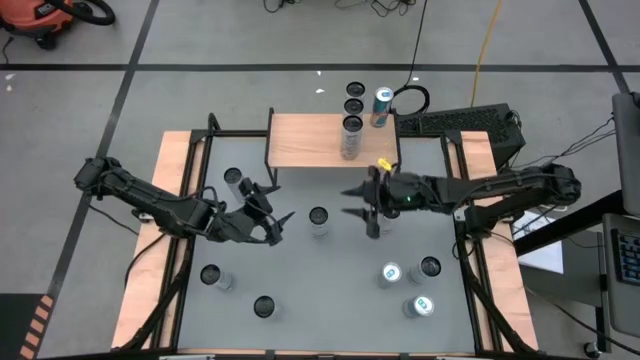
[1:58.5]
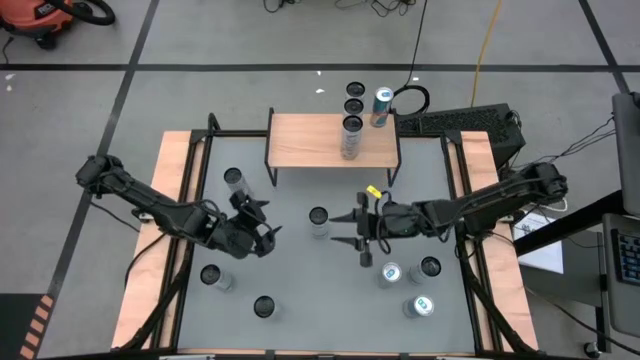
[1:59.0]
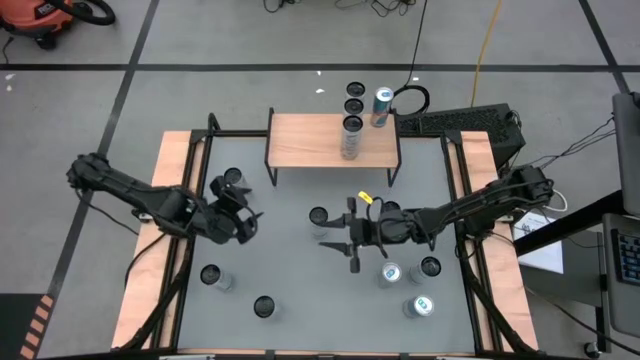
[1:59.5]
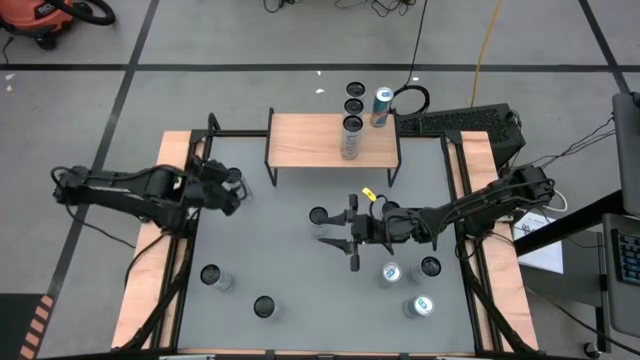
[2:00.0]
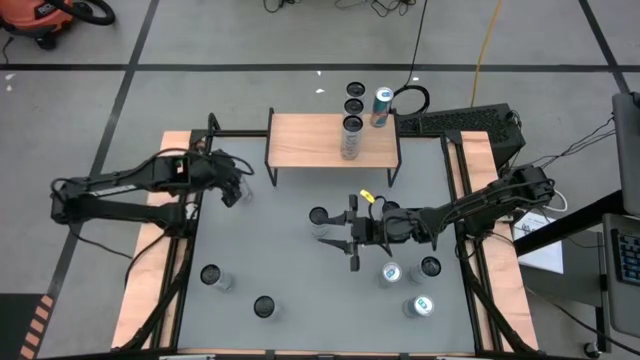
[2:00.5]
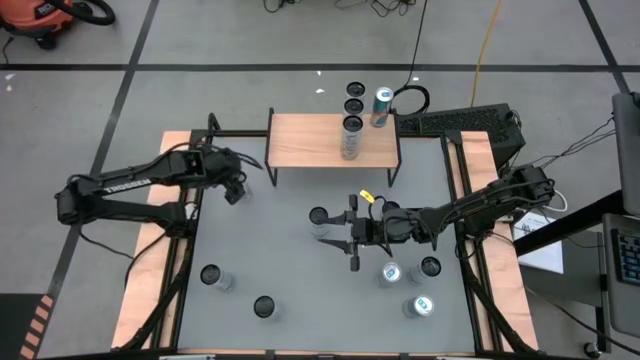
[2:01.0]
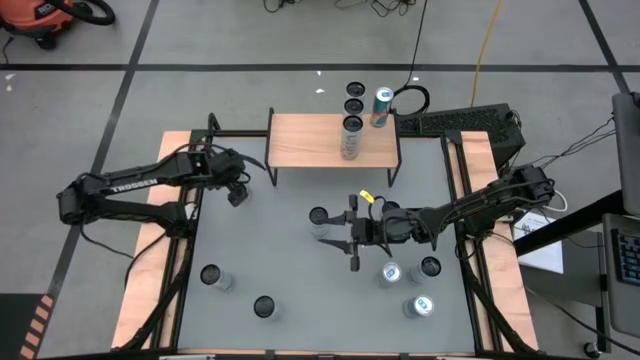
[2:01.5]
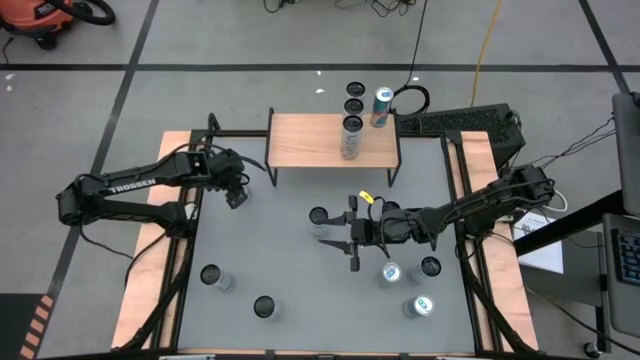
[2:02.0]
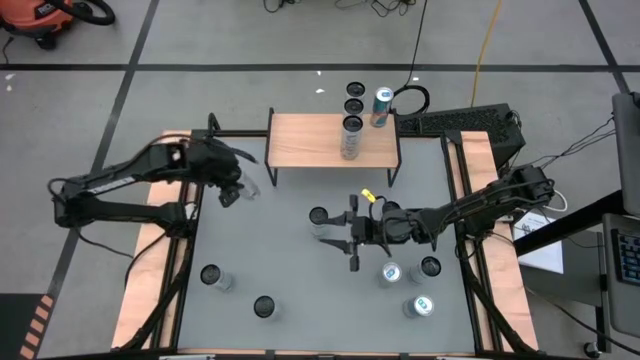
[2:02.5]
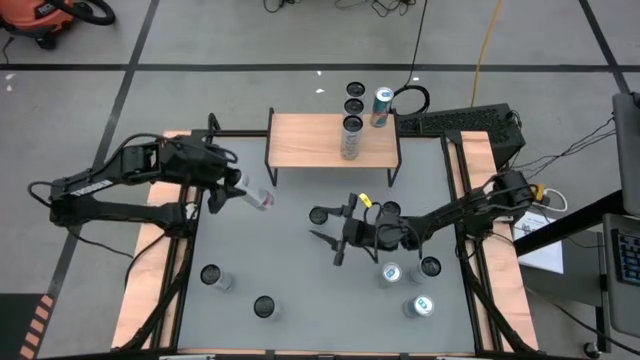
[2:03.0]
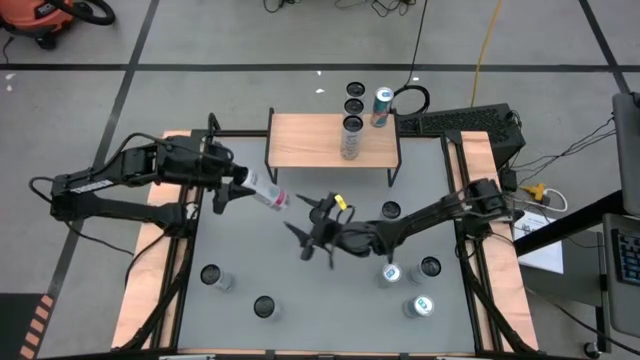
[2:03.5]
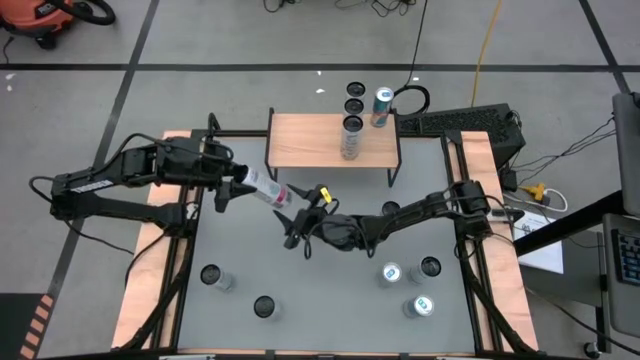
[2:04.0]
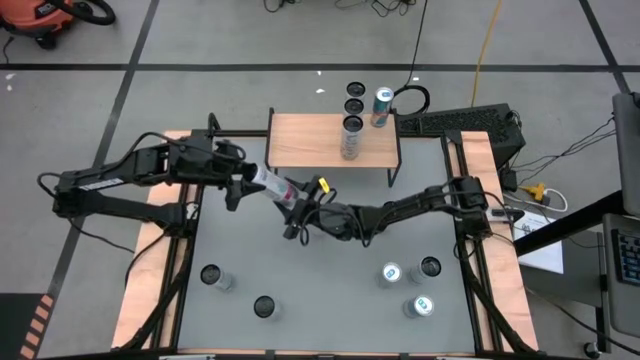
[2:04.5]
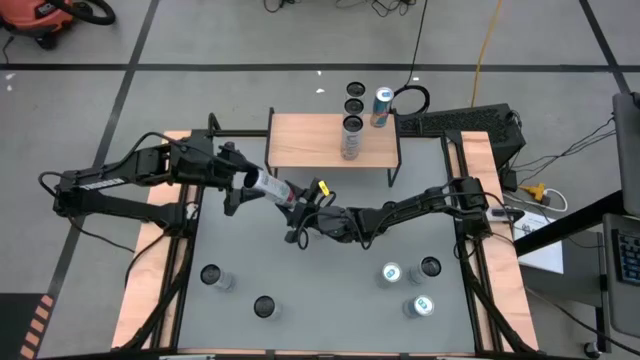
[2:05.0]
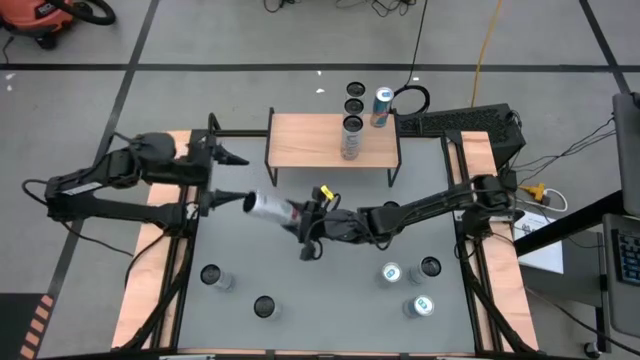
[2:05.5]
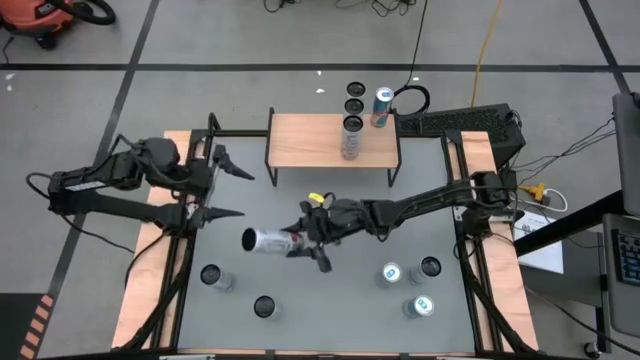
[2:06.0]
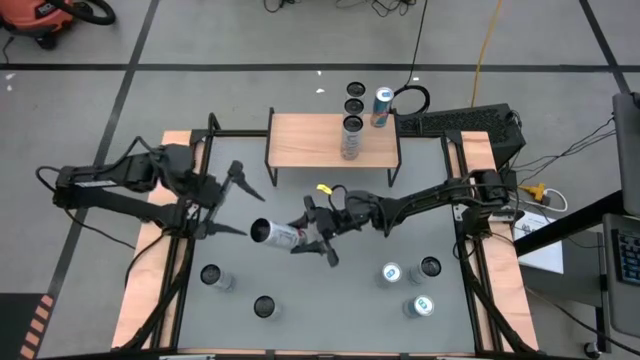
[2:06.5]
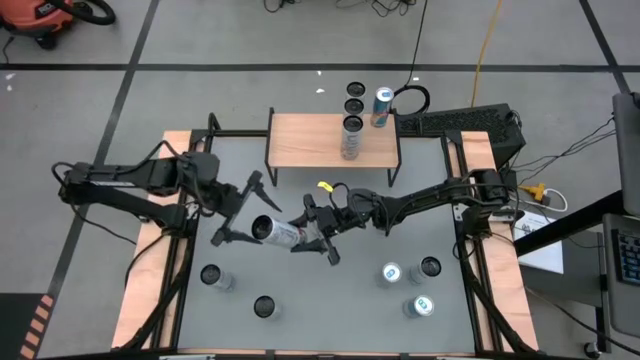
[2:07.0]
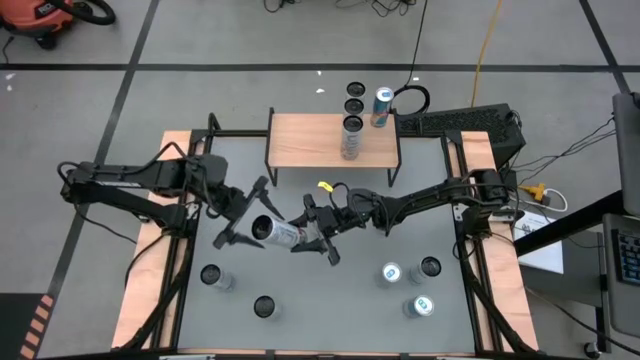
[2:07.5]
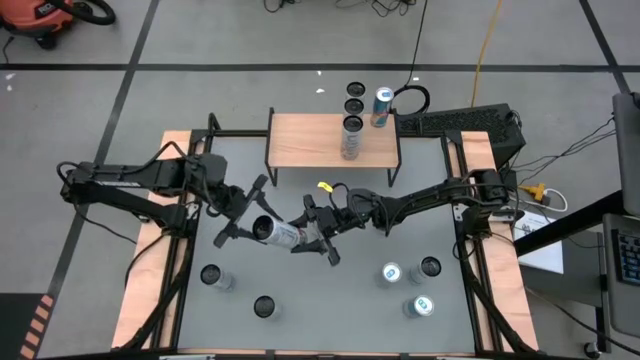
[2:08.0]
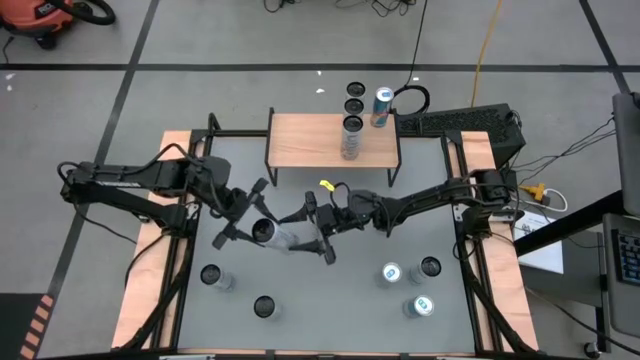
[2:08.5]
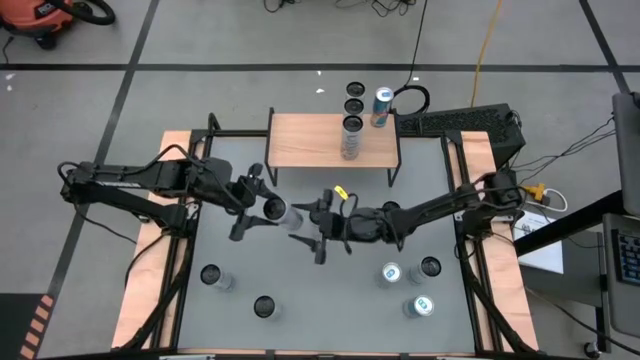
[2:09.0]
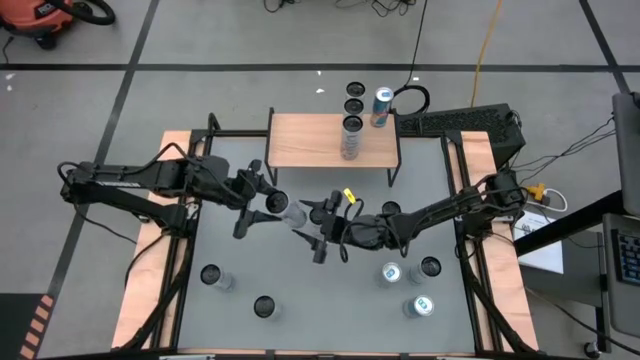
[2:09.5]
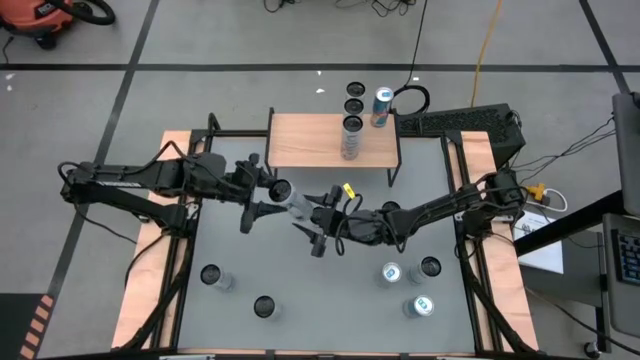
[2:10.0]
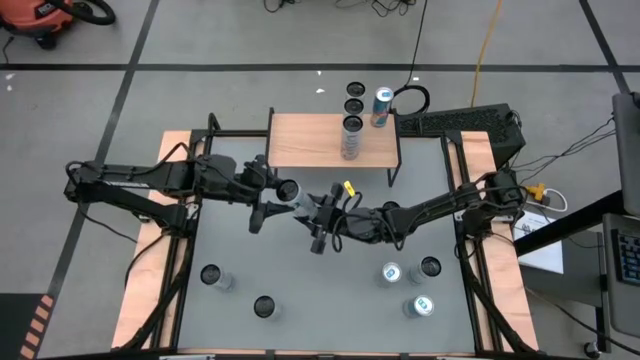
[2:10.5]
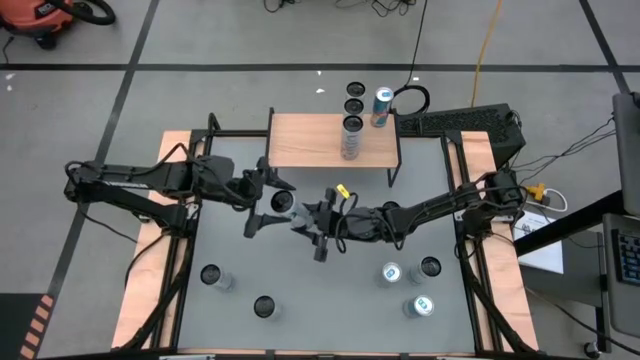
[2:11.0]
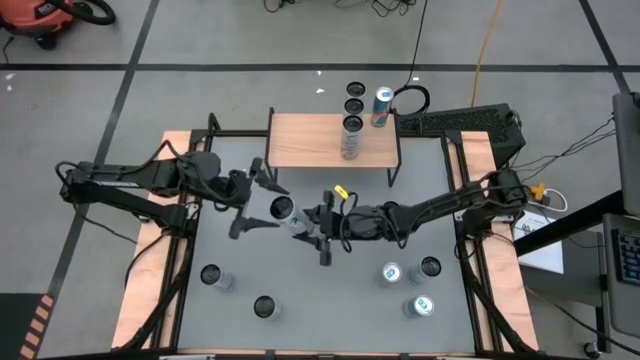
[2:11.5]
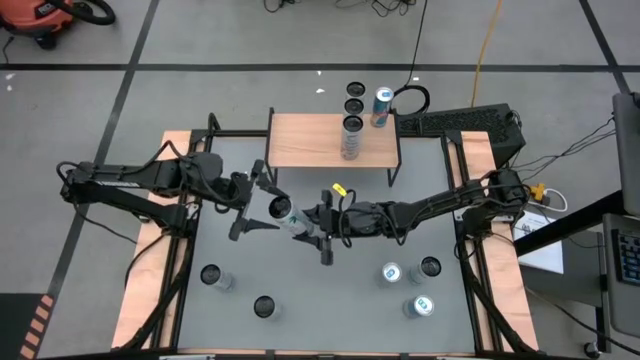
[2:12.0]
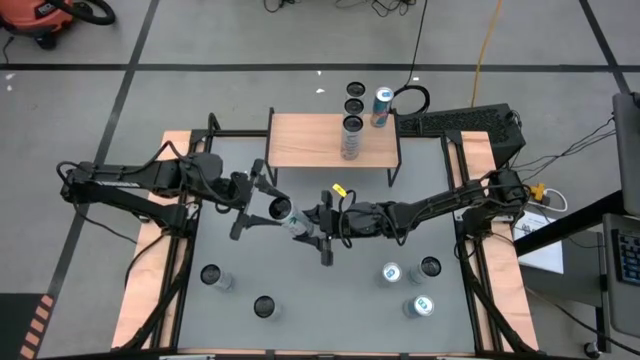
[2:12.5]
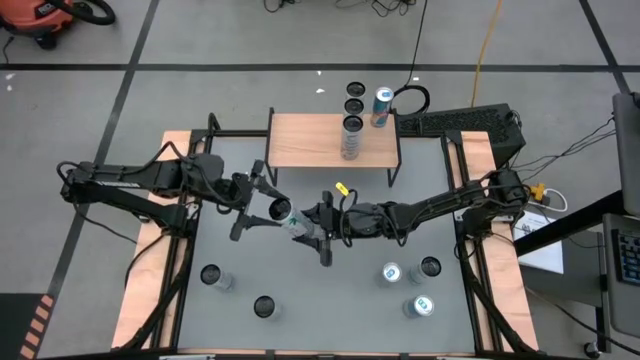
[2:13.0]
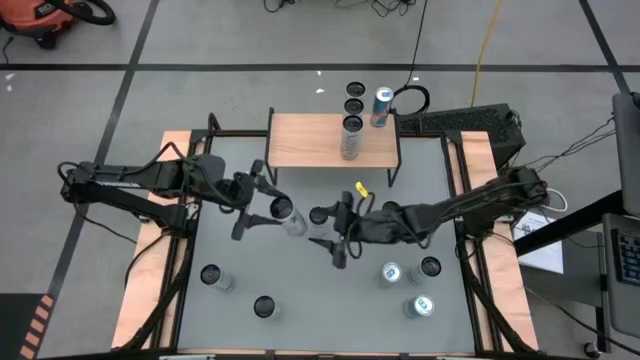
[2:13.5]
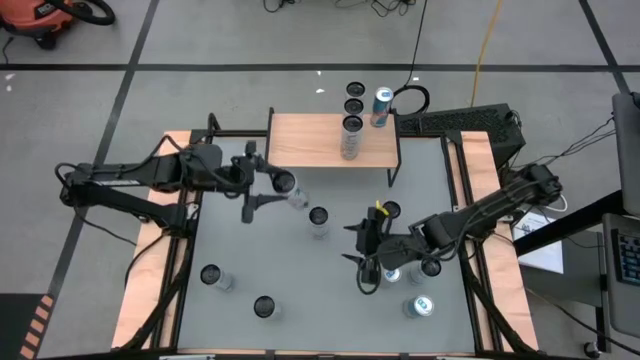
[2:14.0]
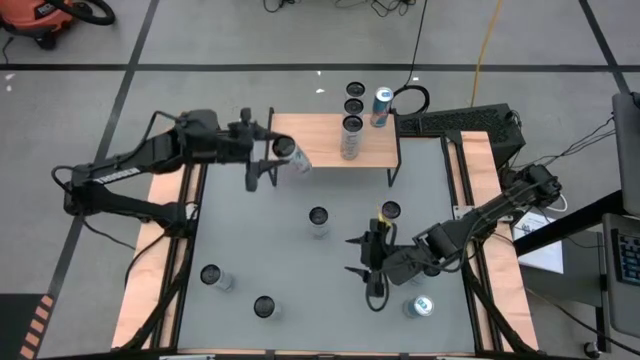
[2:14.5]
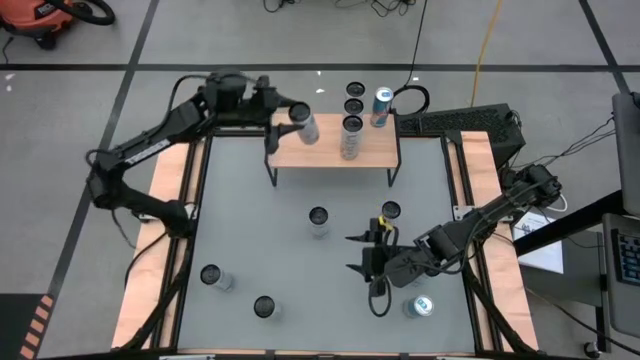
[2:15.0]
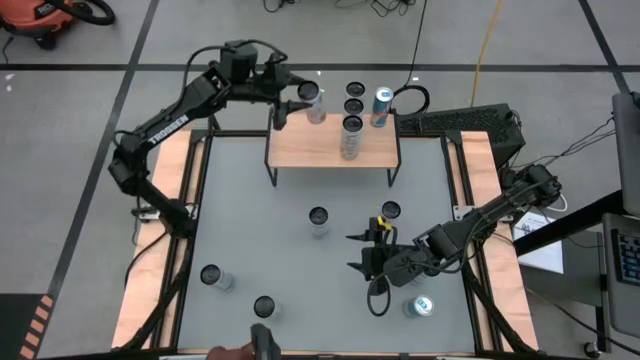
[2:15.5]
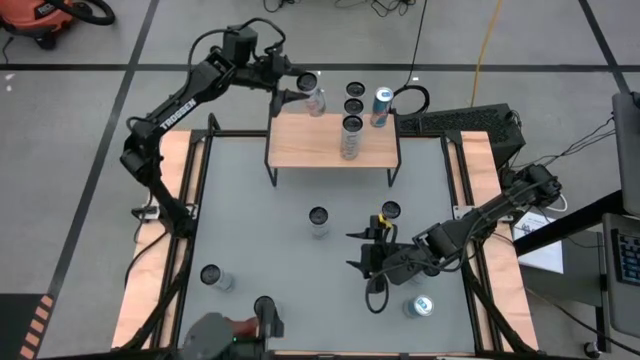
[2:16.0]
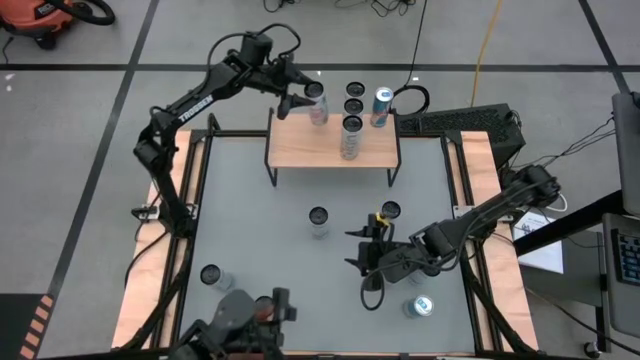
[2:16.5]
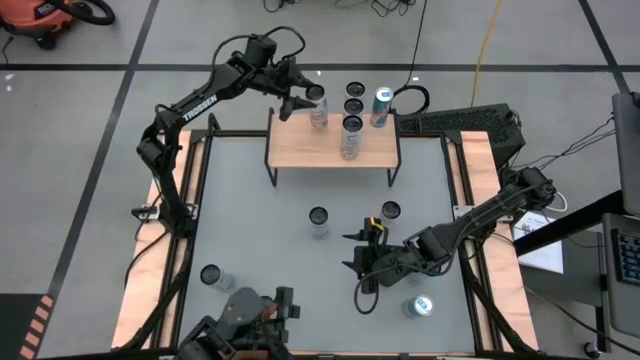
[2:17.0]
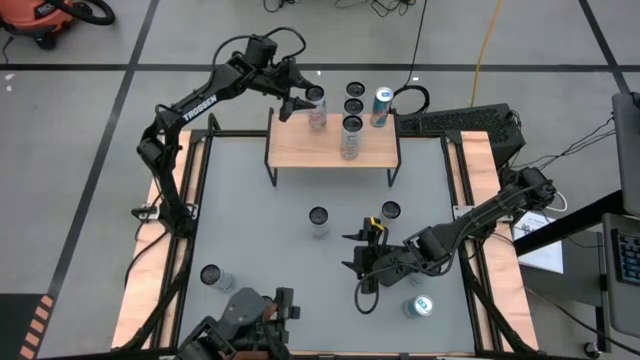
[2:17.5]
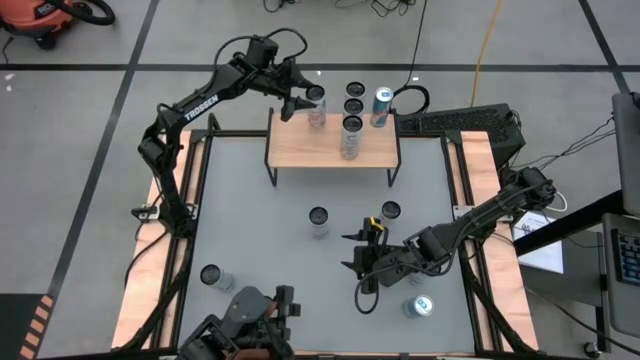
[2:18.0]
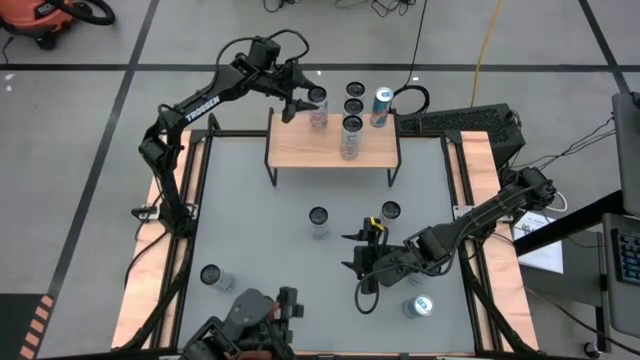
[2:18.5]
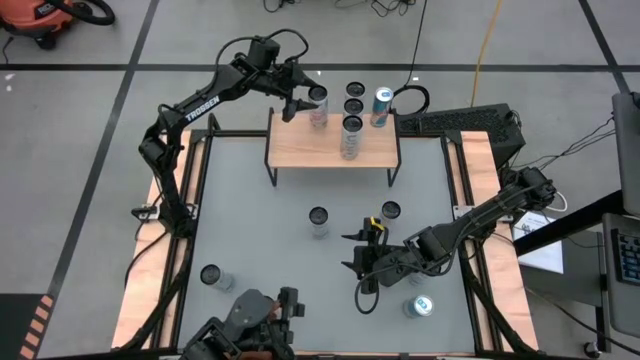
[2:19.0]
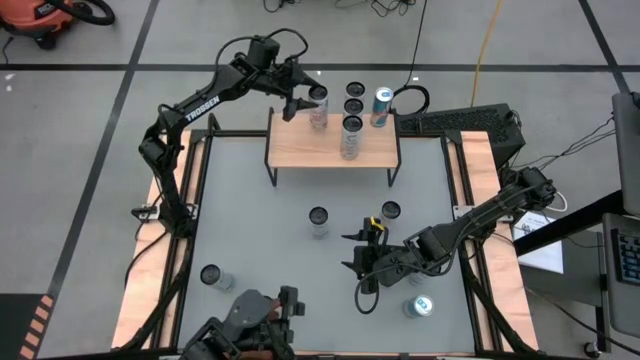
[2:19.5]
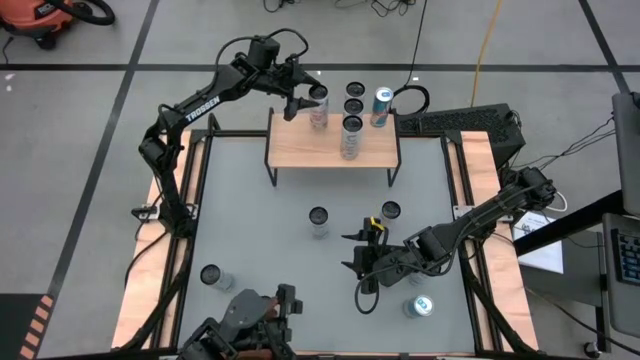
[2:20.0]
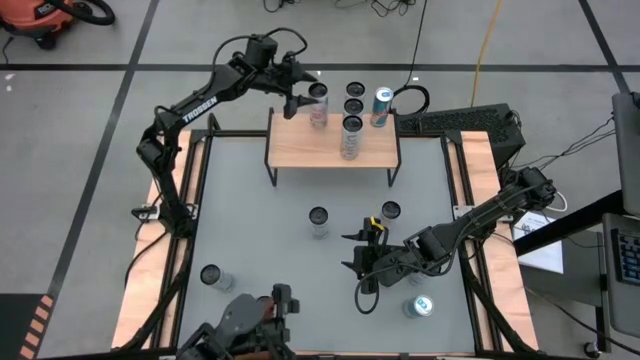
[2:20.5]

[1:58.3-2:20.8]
Task: Place canned beverage on shelf
Put the top left white pink soda can on the shelf
